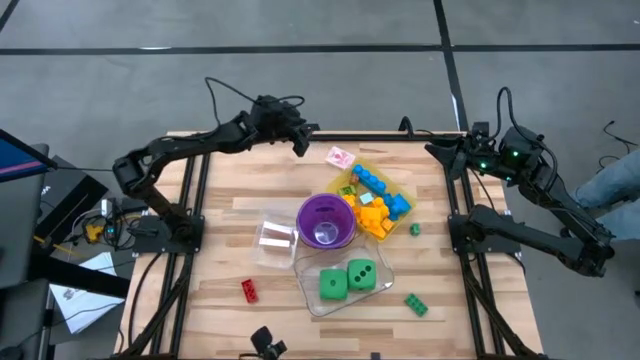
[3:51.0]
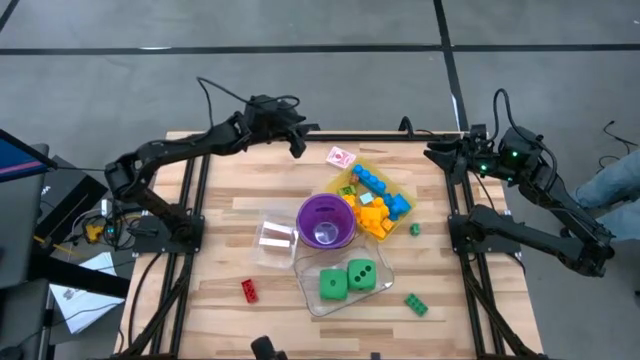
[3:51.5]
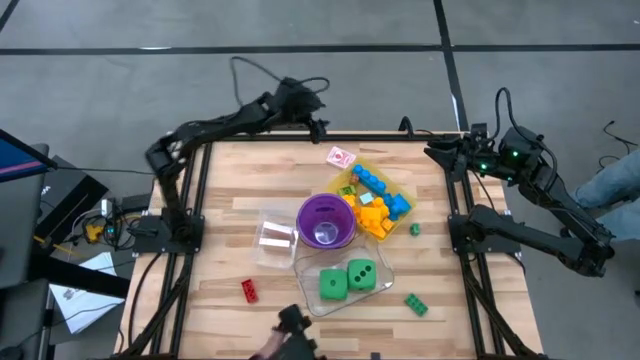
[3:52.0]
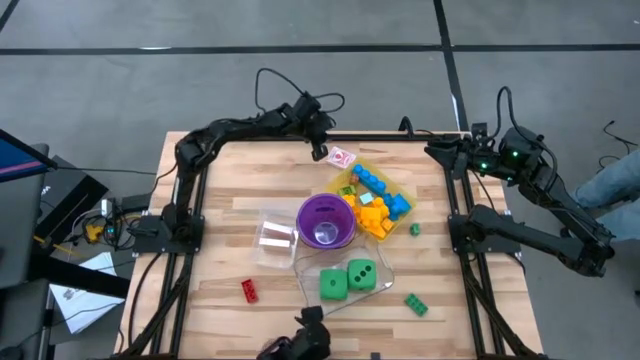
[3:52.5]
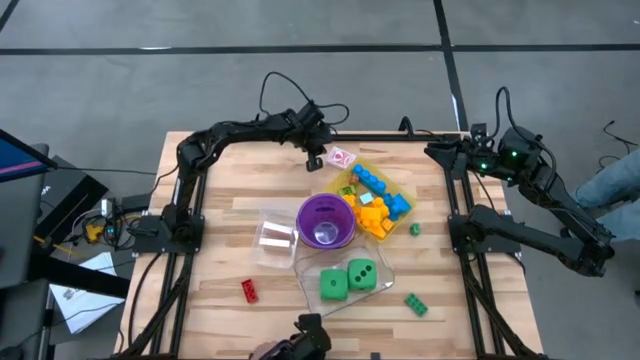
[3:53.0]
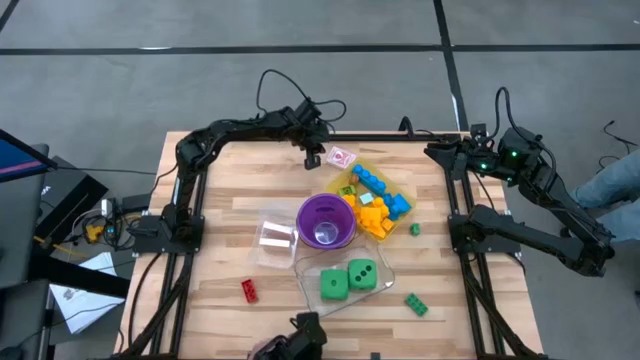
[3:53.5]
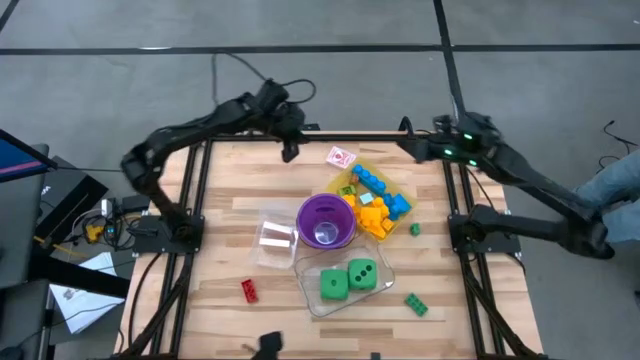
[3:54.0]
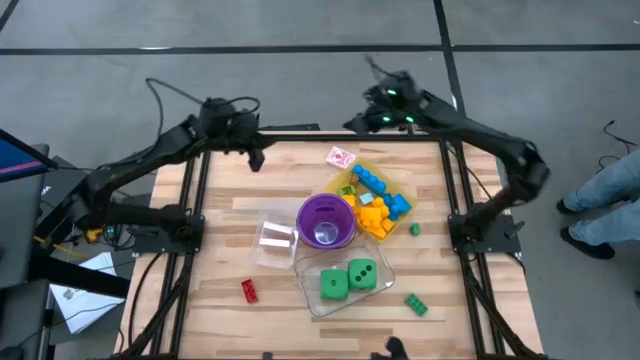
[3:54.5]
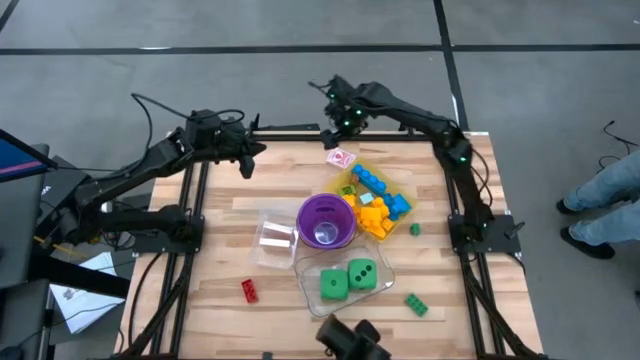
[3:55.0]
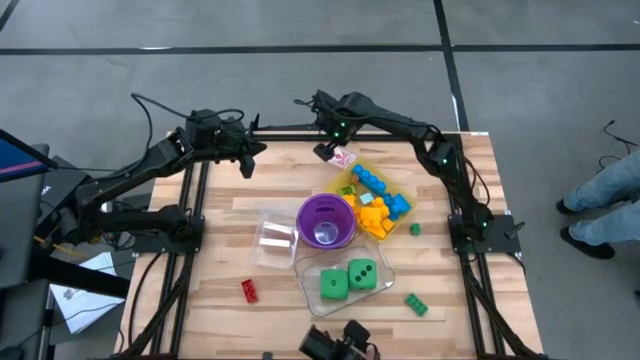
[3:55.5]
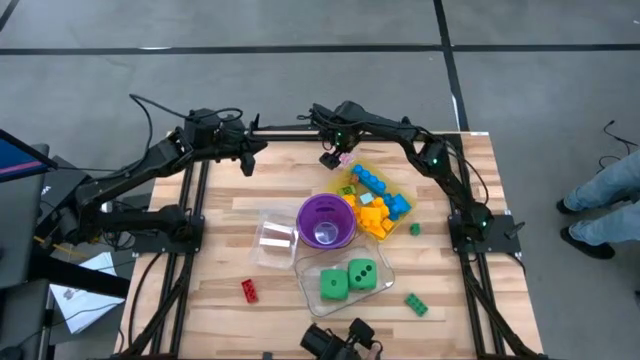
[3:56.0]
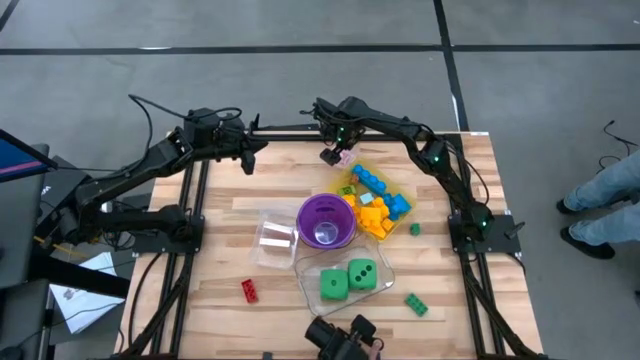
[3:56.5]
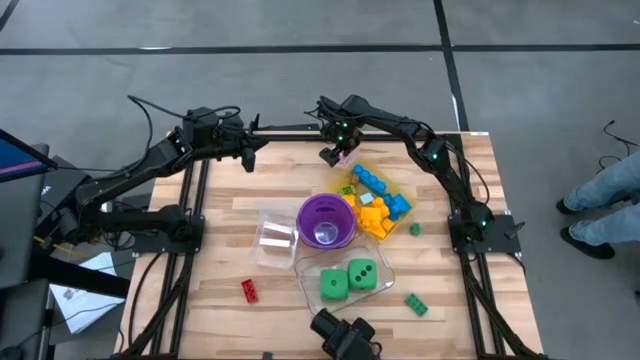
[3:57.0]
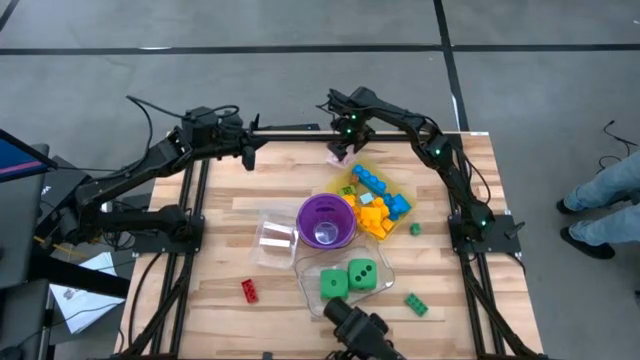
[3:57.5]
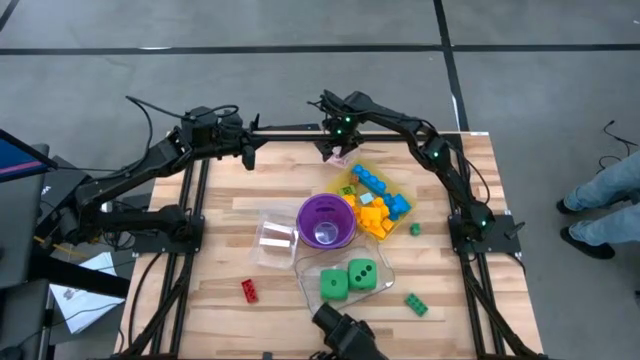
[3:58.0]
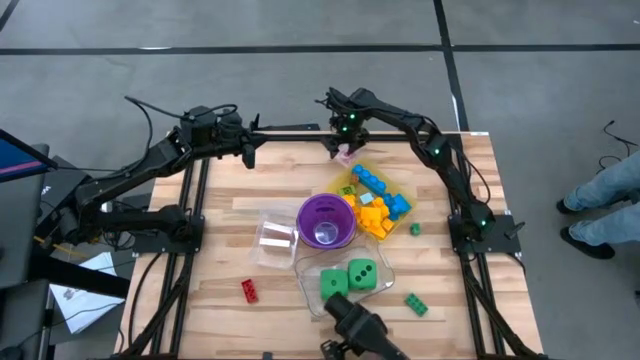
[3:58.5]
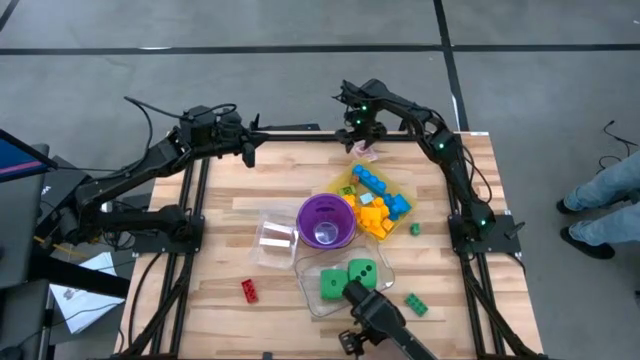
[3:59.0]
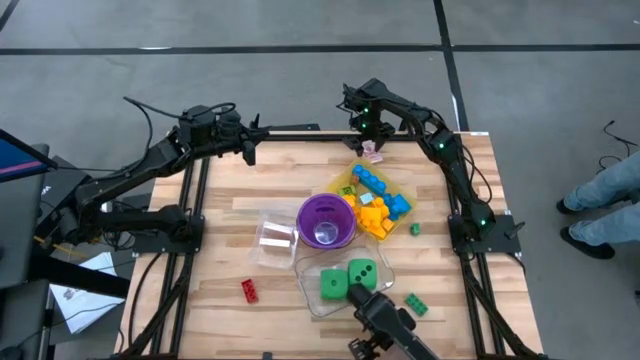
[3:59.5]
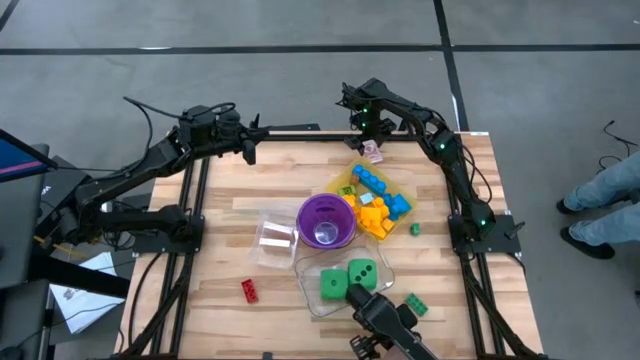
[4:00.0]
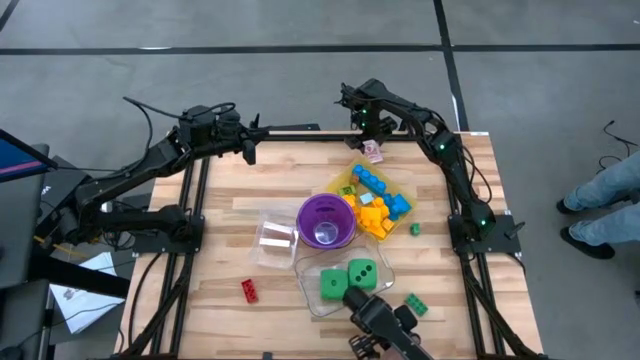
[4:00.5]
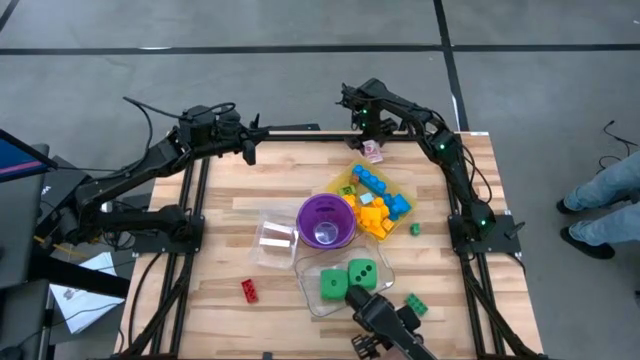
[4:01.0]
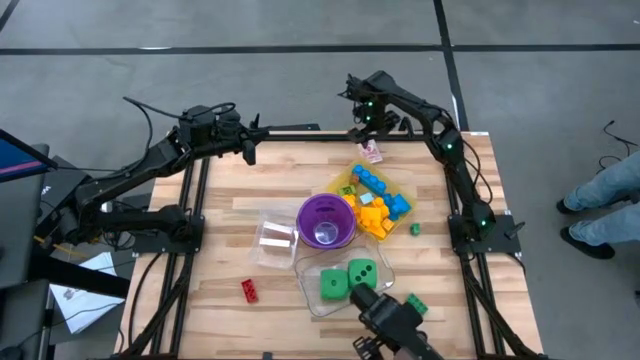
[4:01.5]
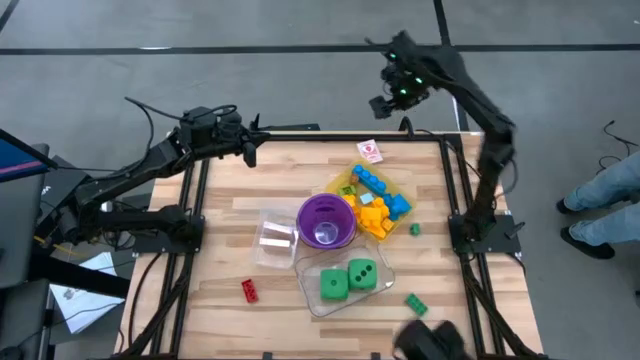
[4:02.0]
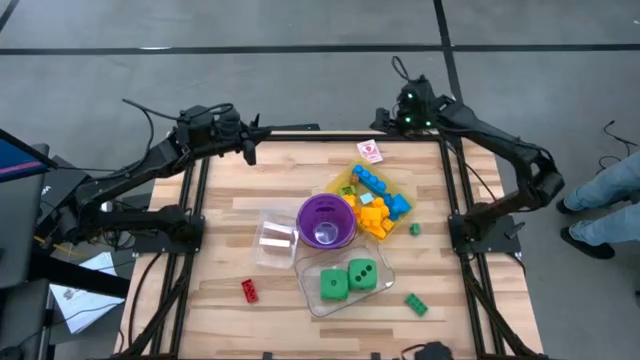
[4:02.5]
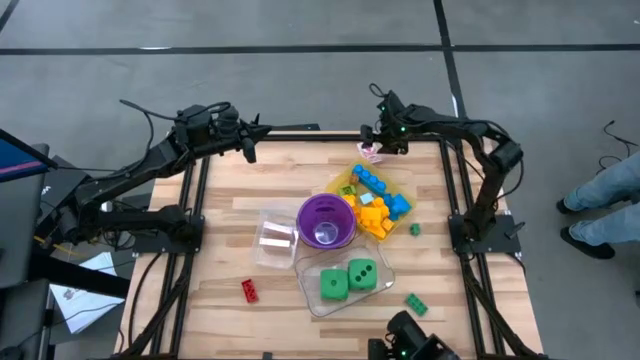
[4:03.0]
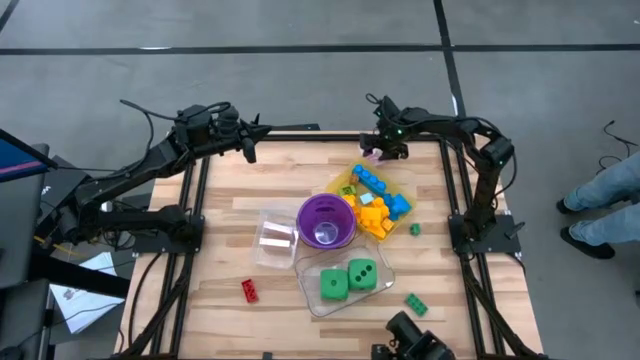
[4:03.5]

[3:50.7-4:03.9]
Task: Pick & Place Toys
Put the red deck of cards into the white bin

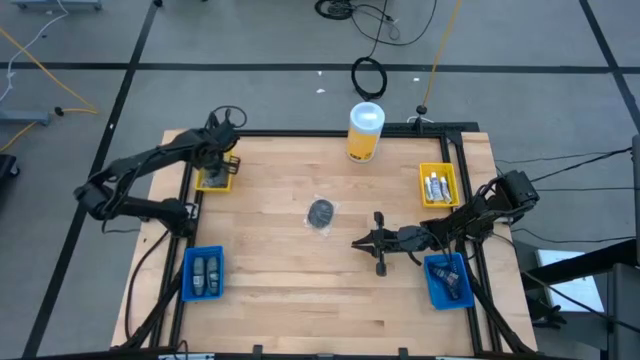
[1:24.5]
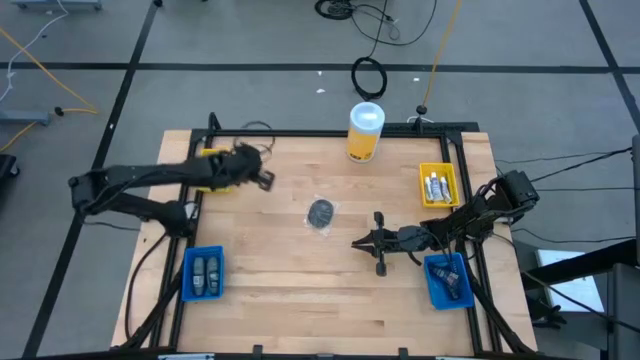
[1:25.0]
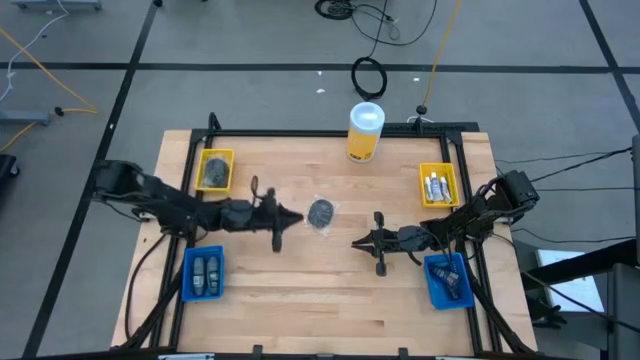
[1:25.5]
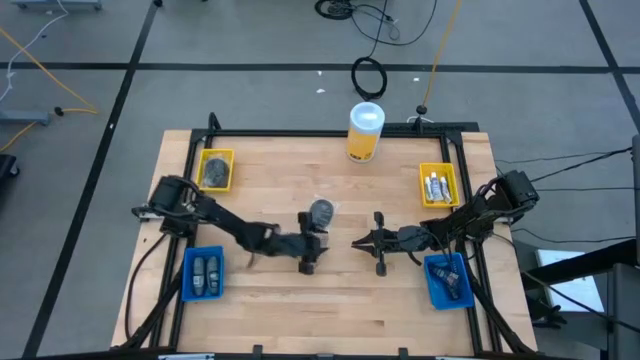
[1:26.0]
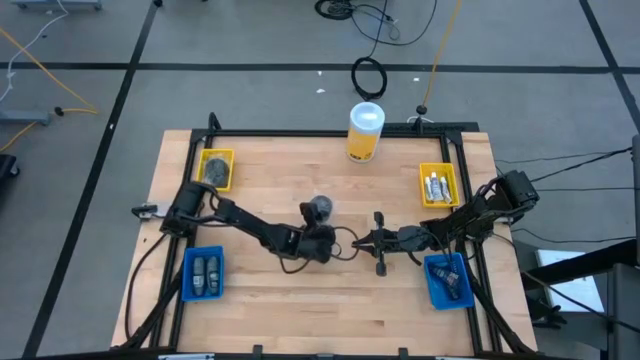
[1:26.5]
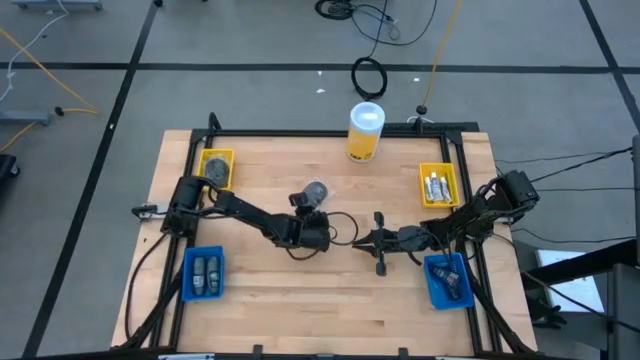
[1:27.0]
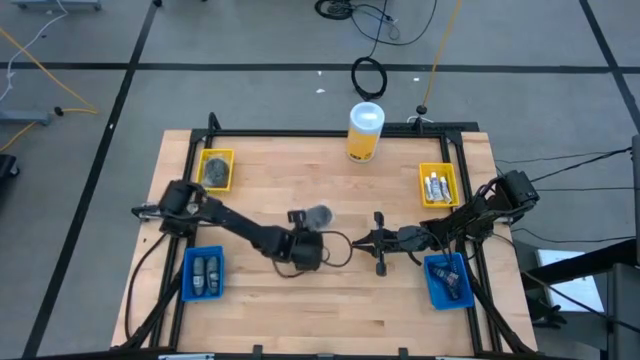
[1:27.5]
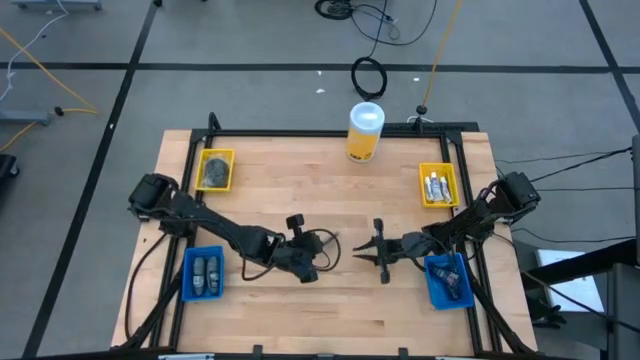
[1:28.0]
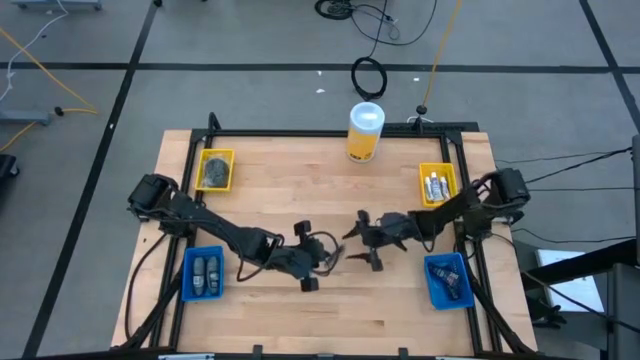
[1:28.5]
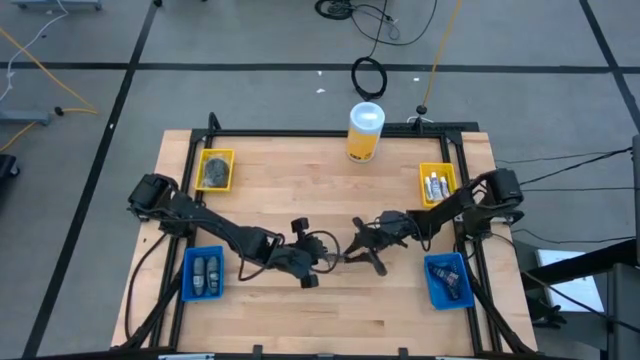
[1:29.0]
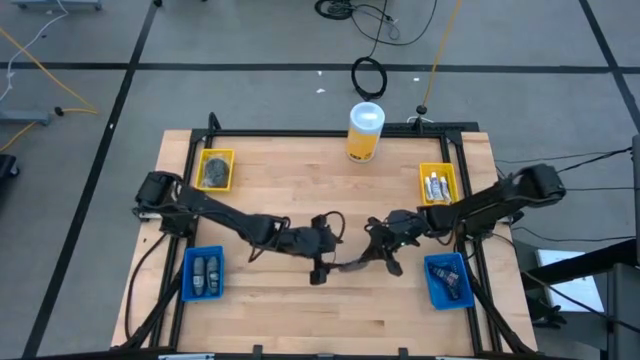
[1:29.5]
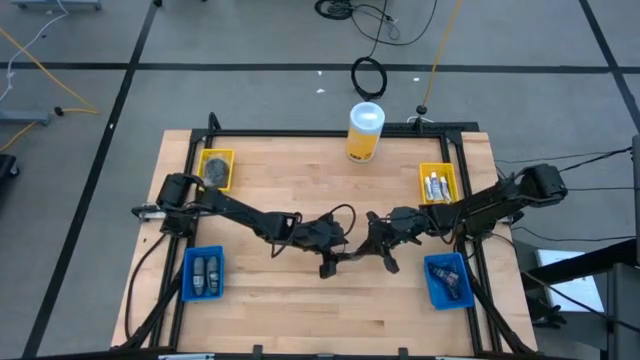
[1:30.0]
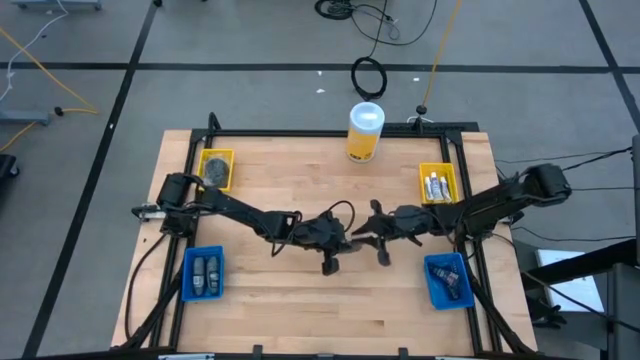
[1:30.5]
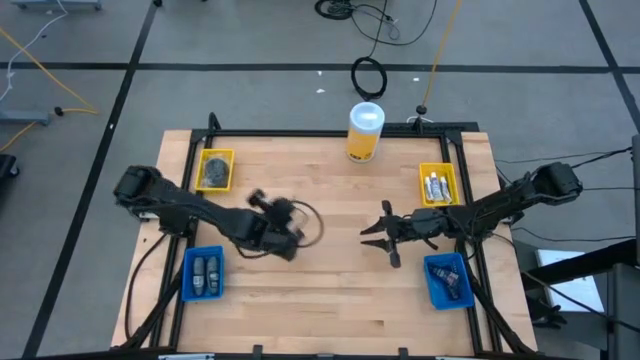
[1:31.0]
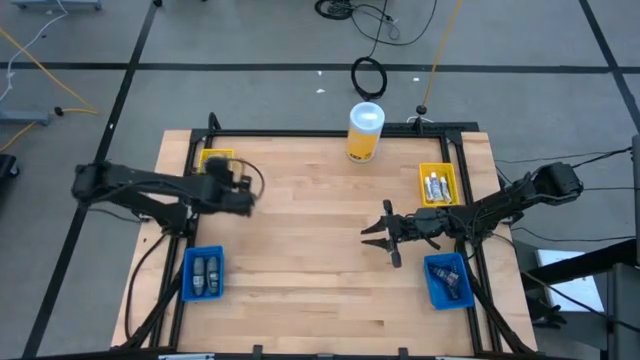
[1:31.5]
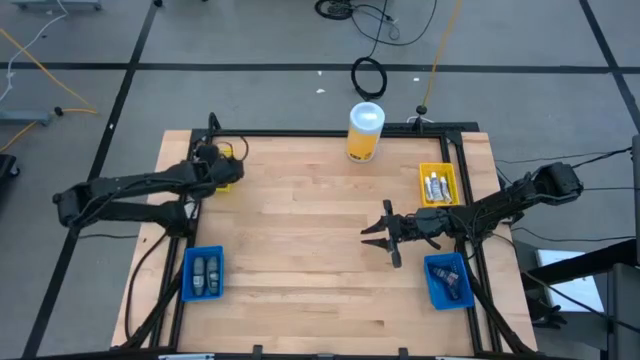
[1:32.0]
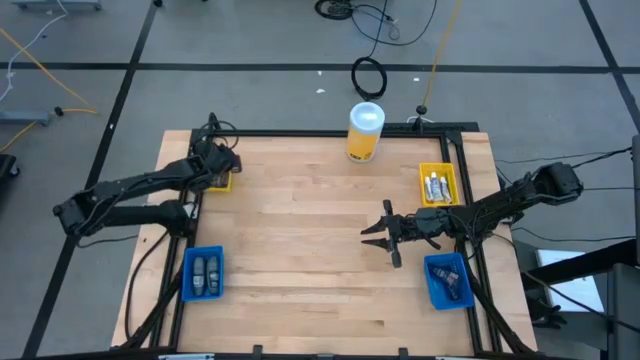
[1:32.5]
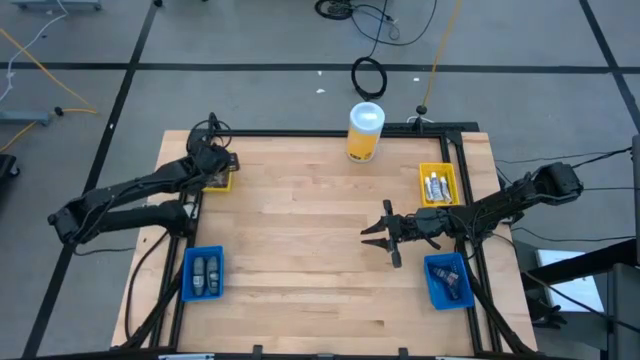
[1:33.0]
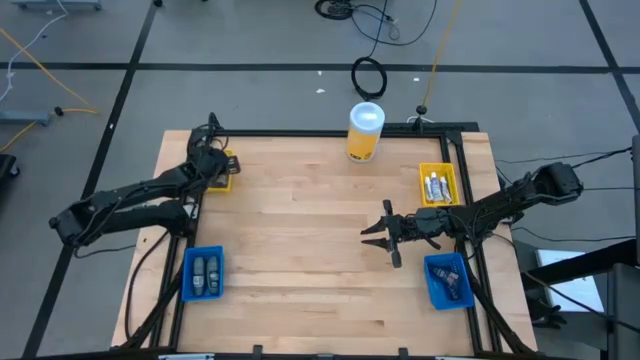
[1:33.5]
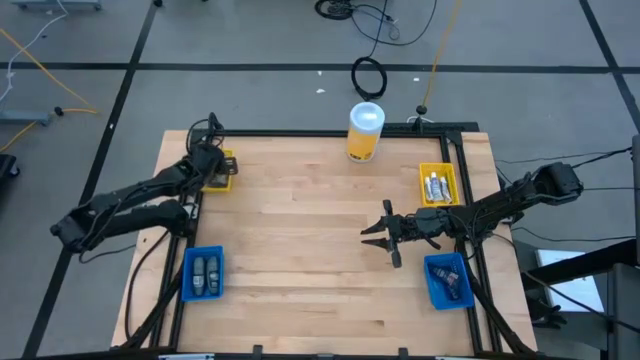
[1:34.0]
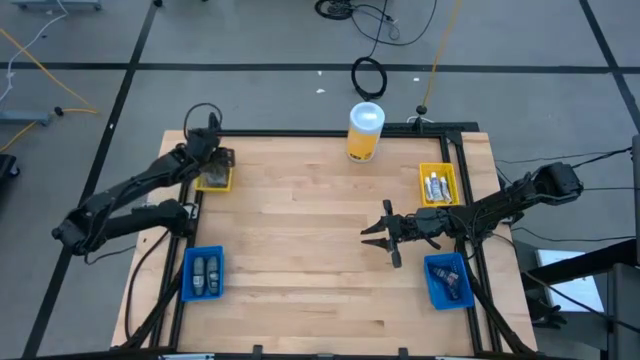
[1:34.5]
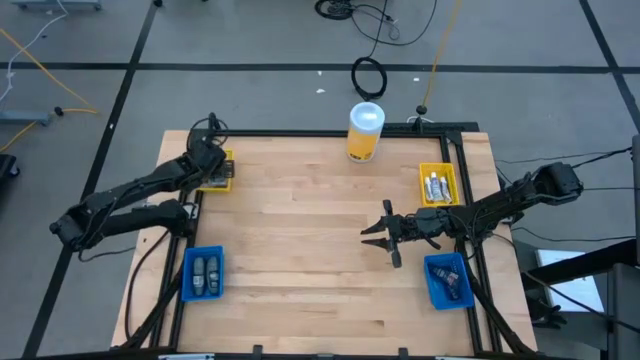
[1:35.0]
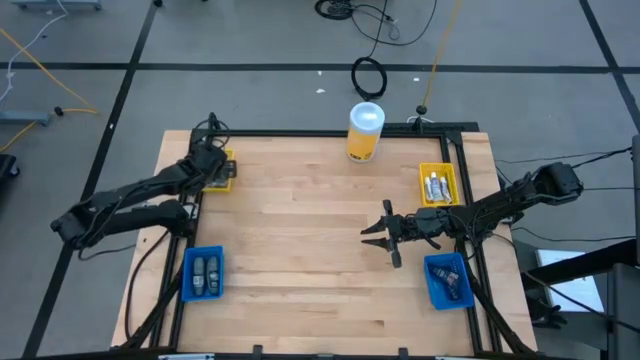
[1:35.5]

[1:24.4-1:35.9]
Task: Pick & Place Travel size toiletries
Put the black hairbrush into the left yellow bin
